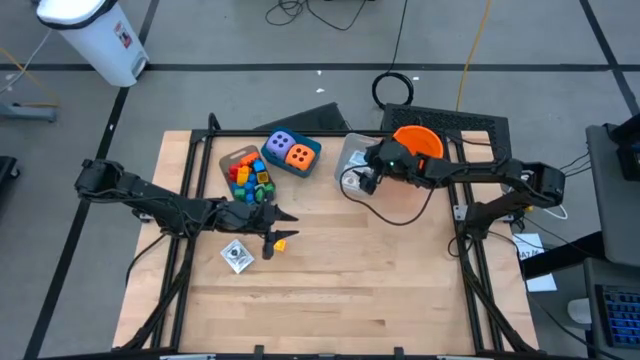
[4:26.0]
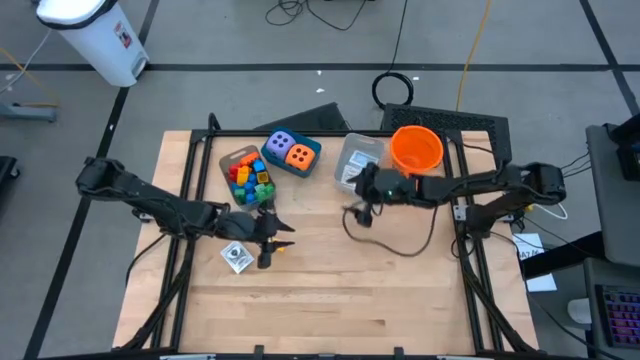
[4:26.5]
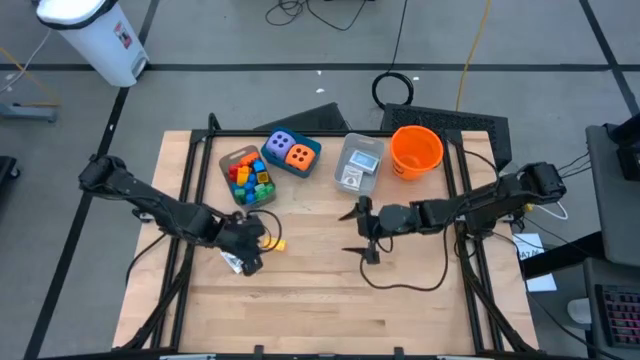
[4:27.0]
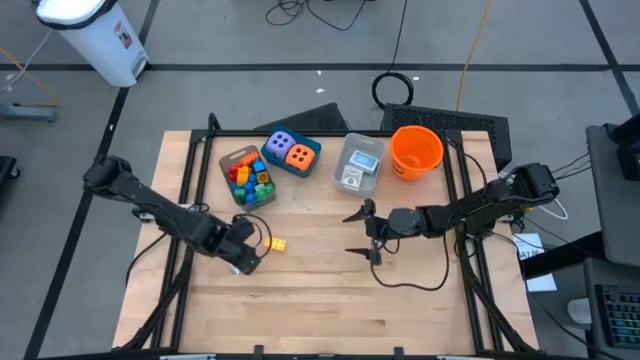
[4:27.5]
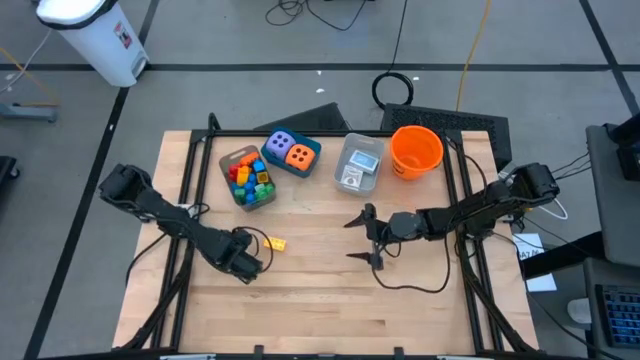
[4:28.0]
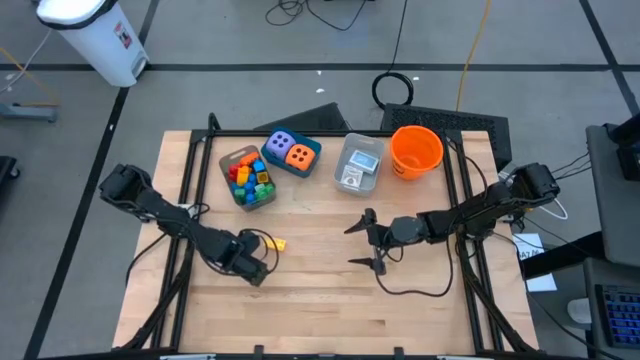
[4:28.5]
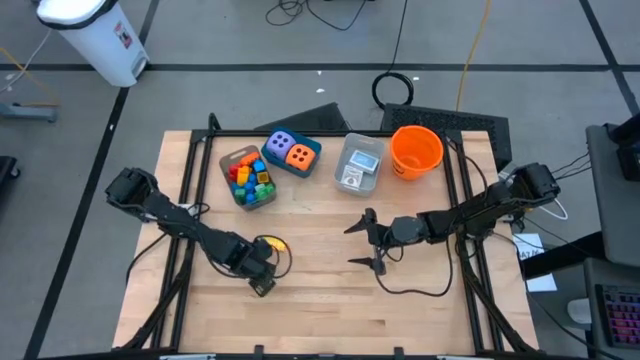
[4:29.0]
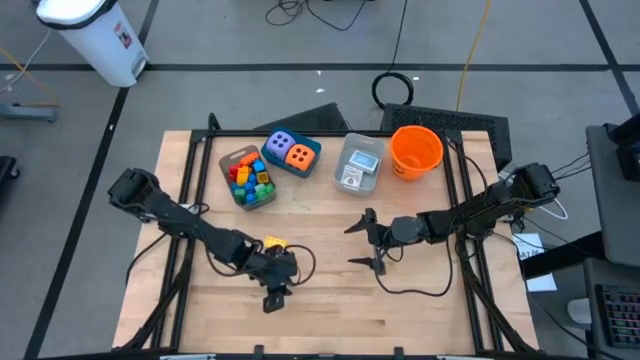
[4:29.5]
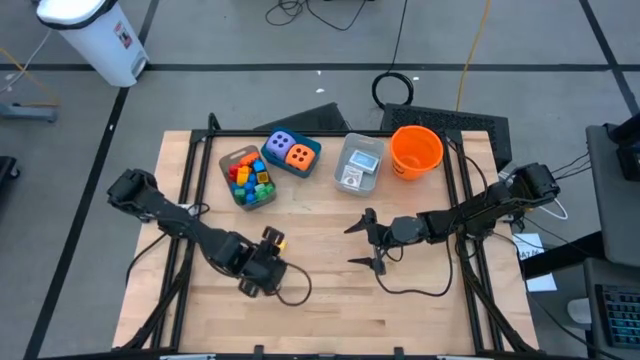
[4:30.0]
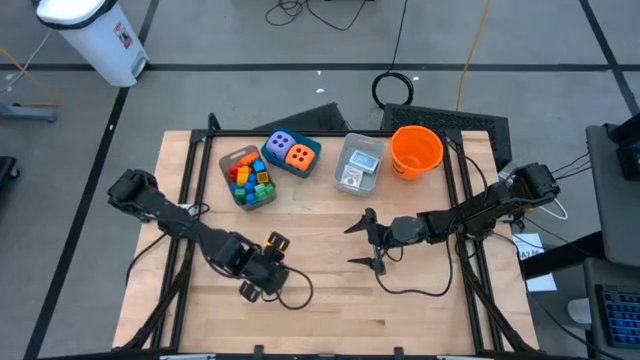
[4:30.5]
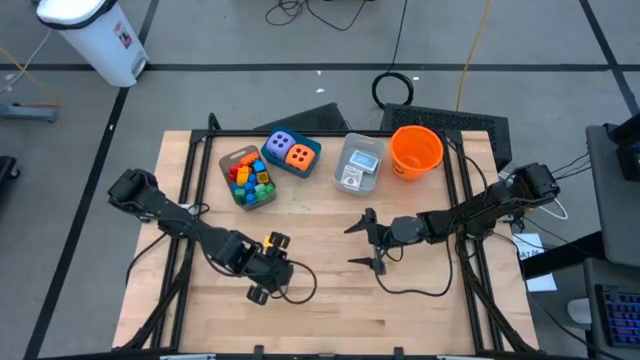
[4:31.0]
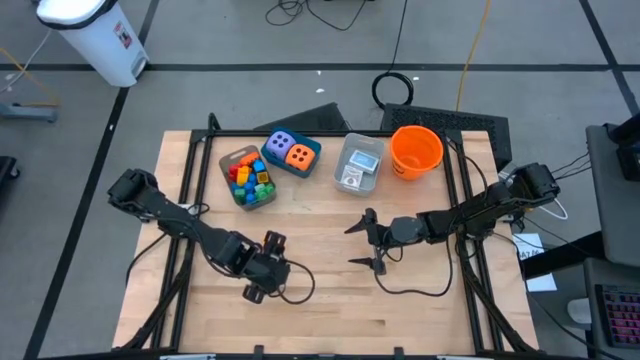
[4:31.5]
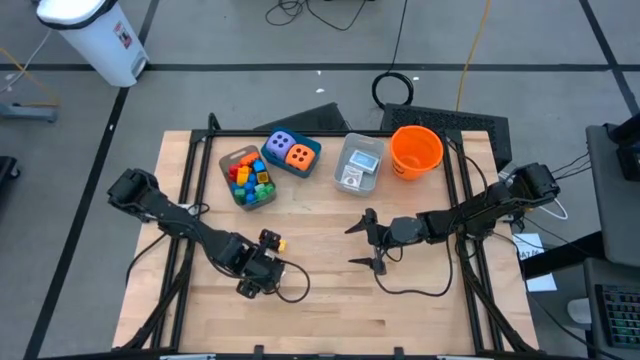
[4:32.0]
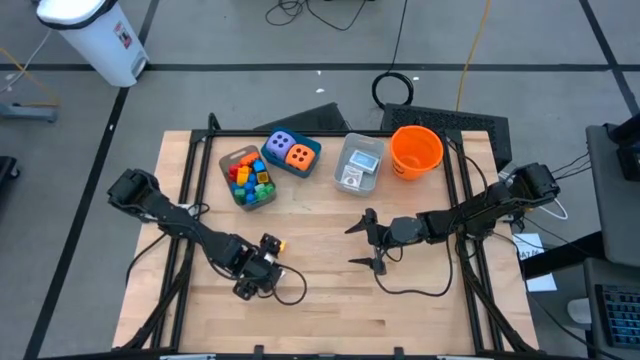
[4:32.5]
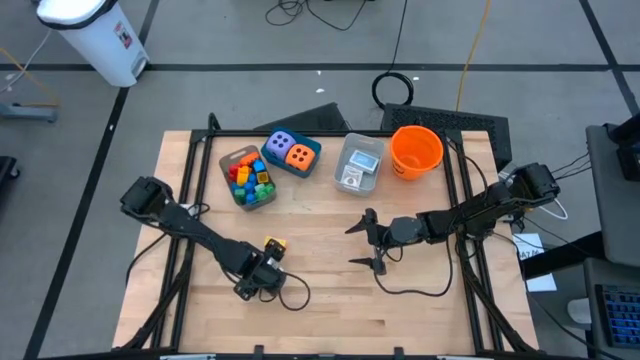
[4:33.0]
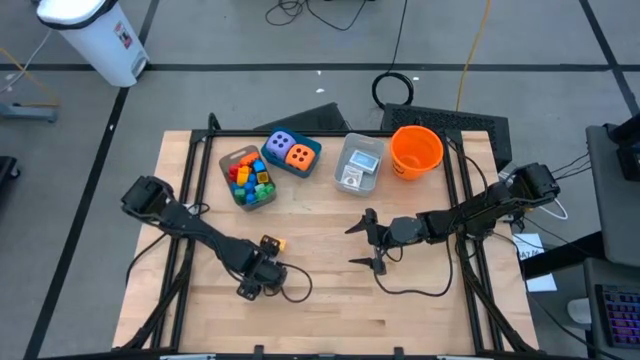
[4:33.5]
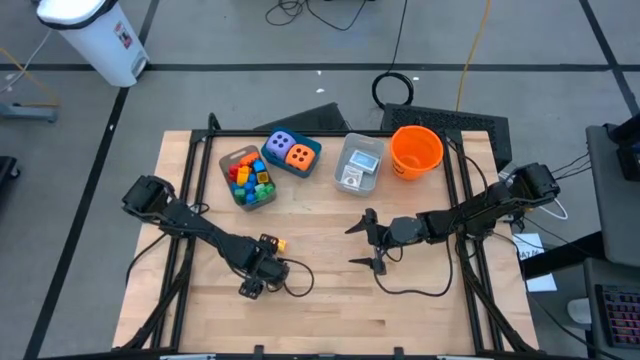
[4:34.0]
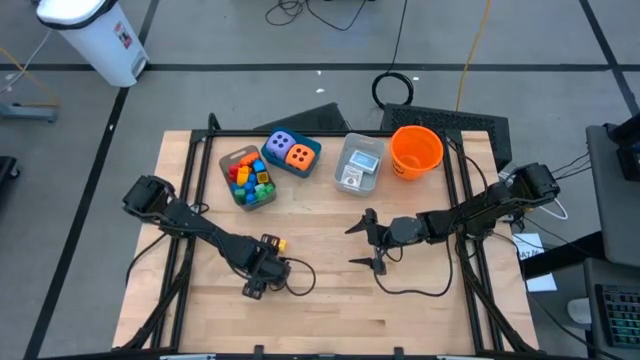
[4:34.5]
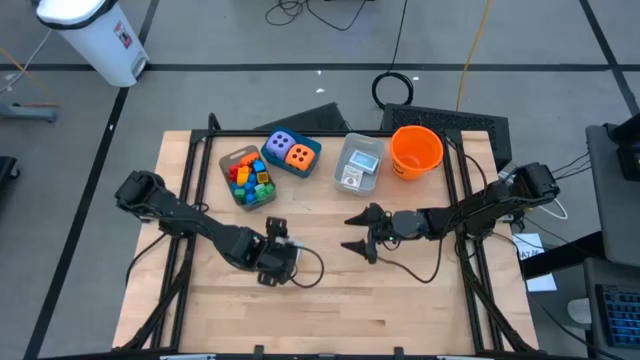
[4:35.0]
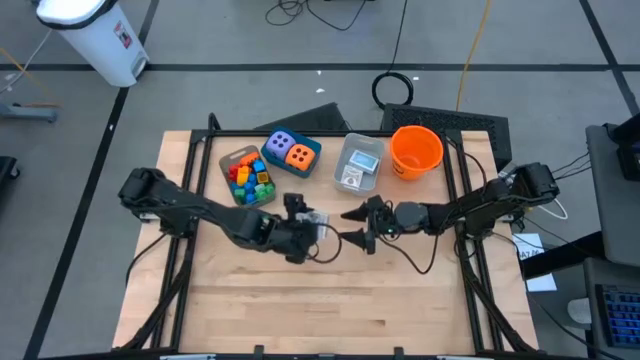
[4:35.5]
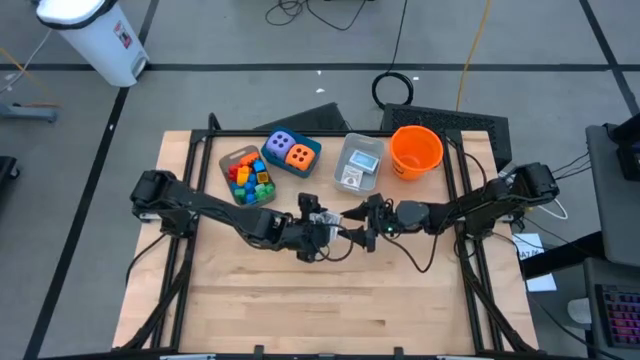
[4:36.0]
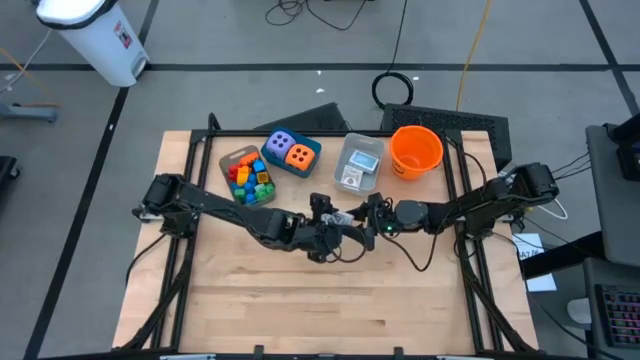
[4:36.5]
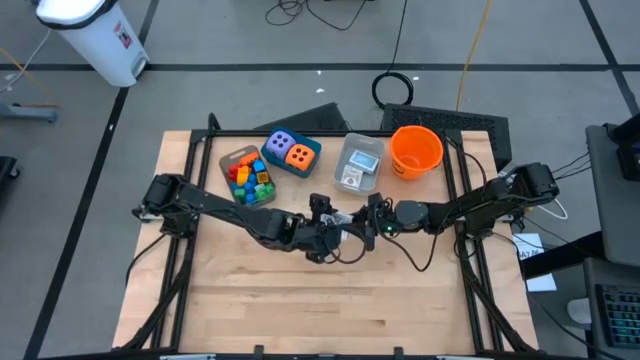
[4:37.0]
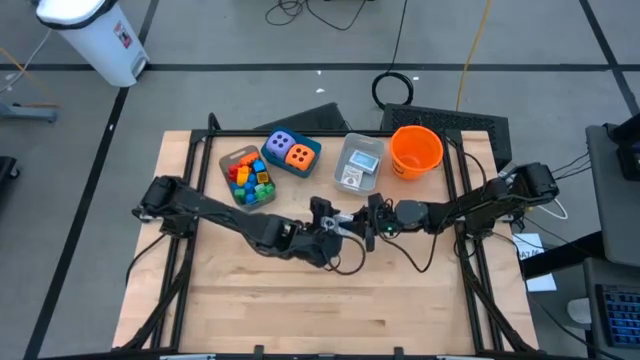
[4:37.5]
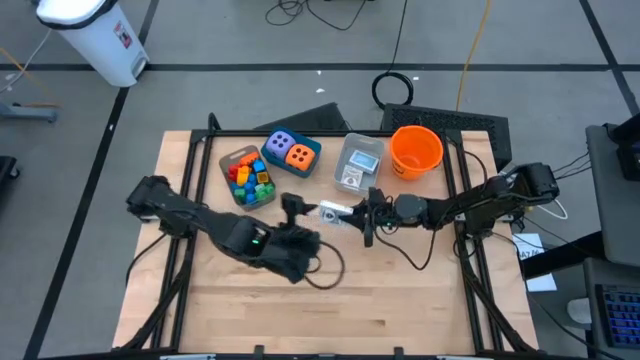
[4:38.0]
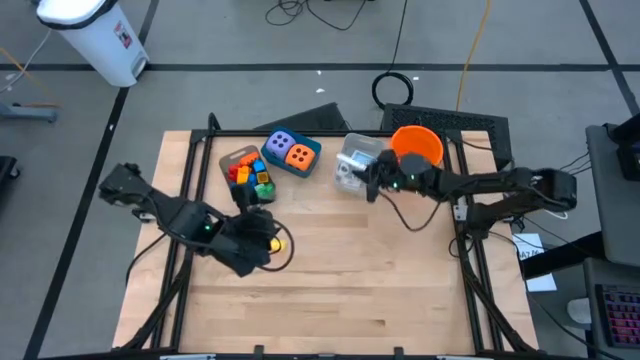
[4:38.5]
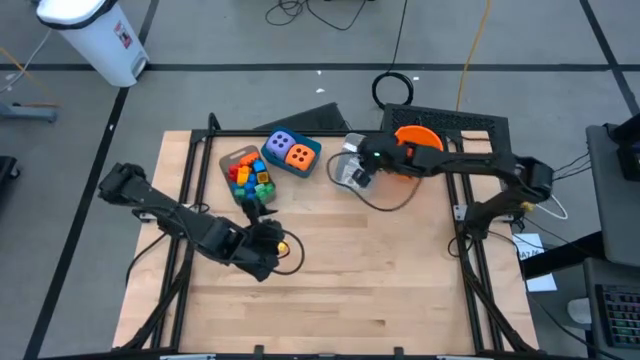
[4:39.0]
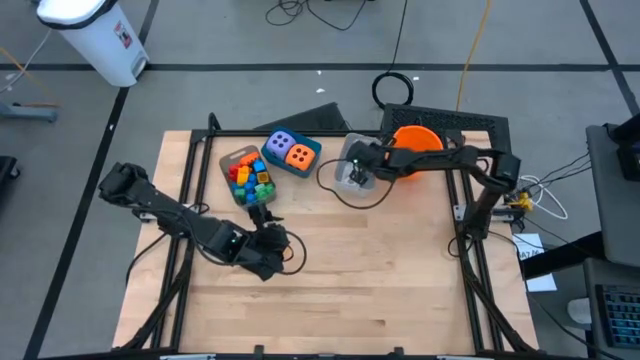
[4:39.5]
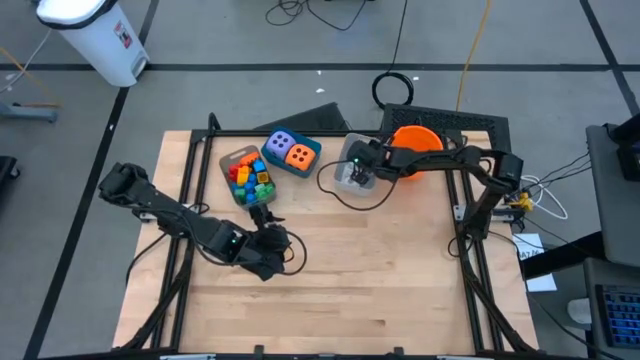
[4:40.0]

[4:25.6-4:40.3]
Task: Pick & Place Toys
Put the black deck of cards into the gray bin

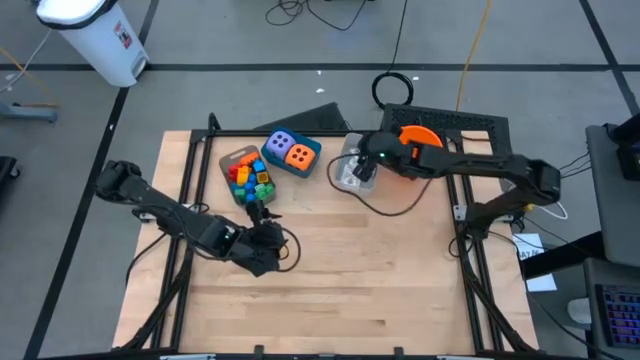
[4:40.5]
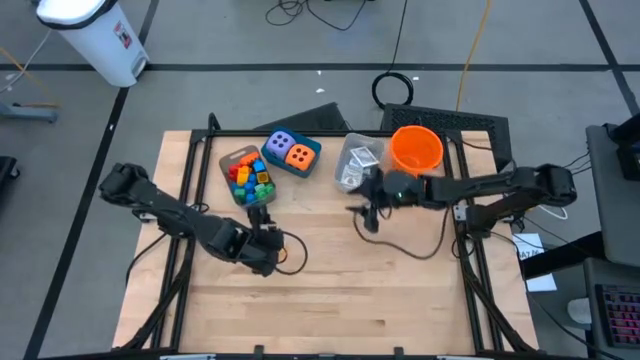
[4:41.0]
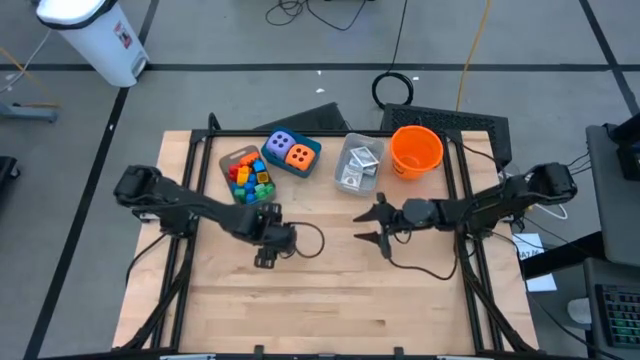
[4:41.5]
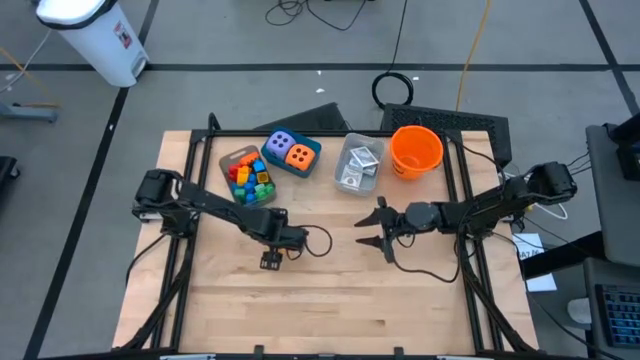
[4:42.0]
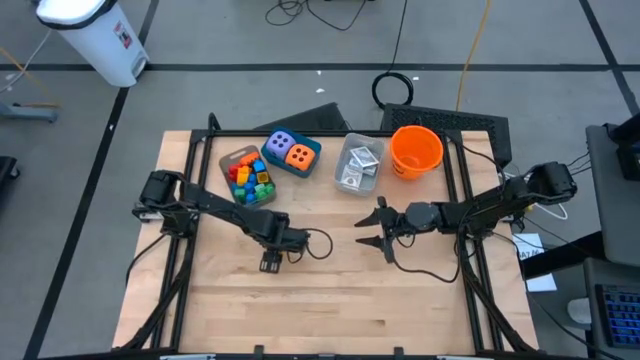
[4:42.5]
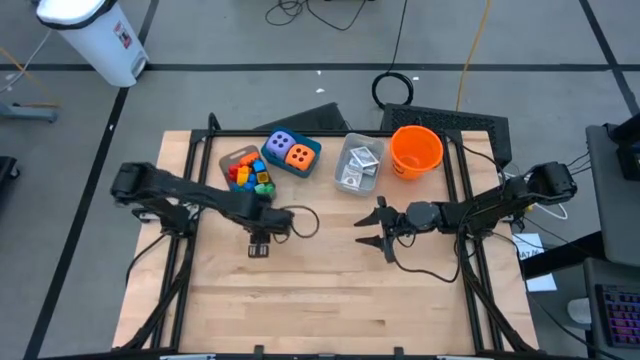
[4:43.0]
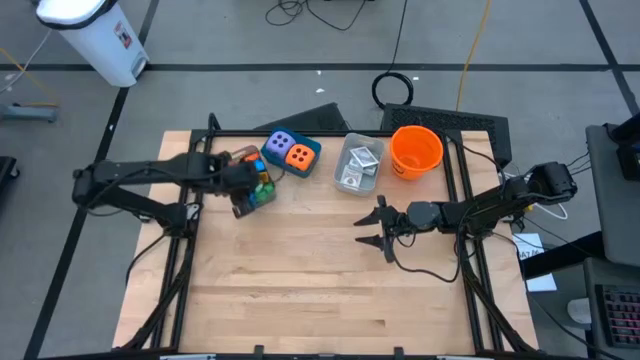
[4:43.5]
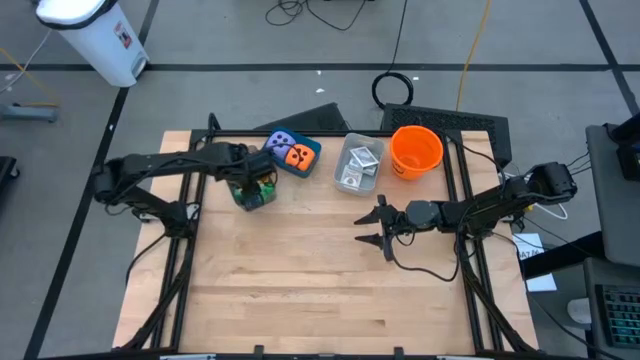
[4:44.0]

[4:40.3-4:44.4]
Put the yellow game piece into the black bin

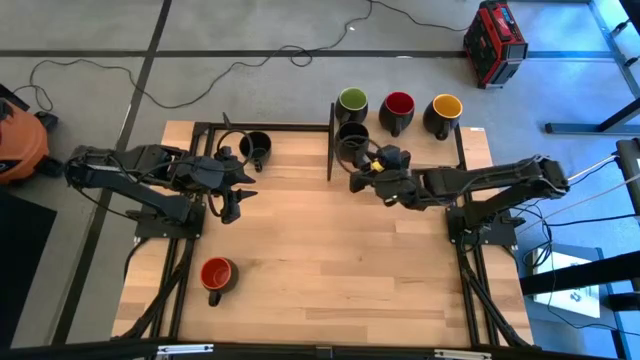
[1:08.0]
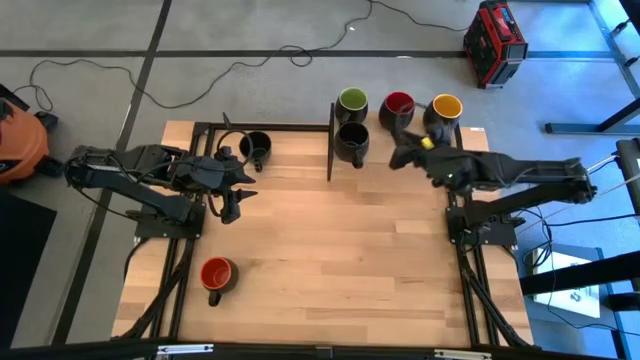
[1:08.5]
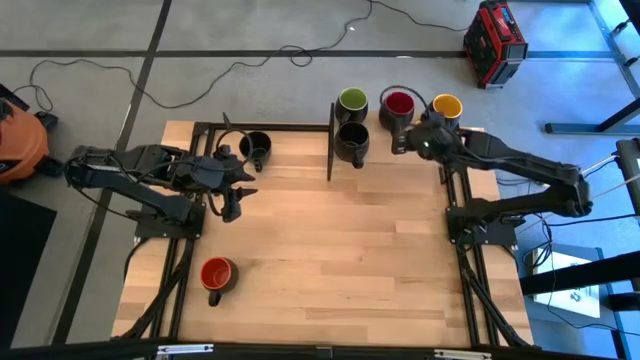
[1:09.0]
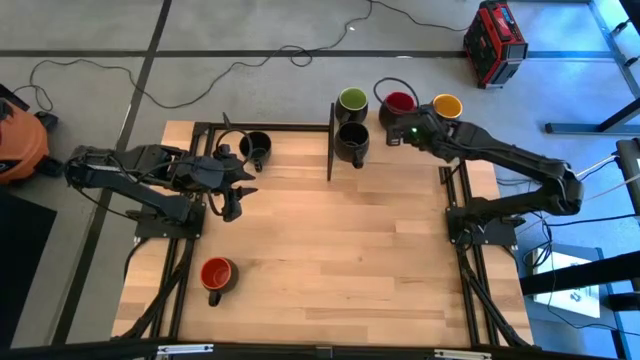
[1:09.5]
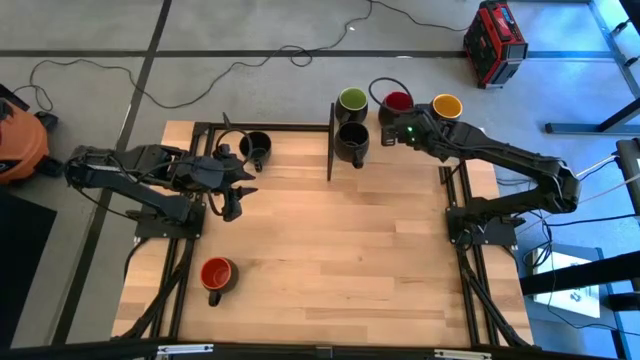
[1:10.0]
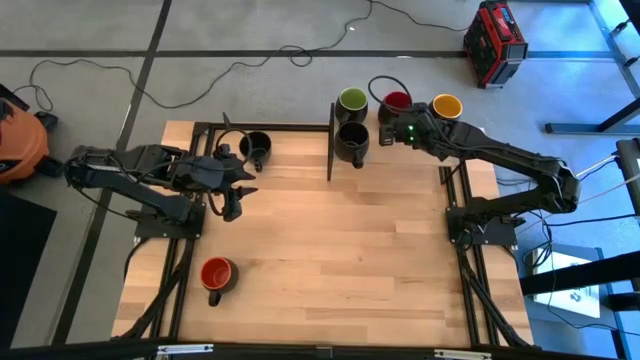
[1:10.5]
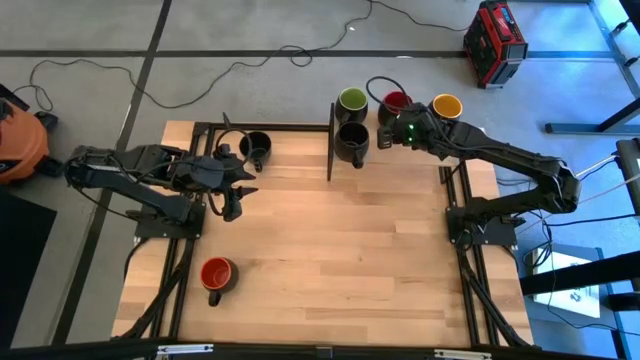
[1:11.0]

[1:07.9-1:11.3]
Task: Place coffee mugs
Adjust the red mug
